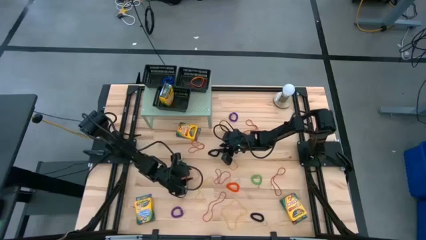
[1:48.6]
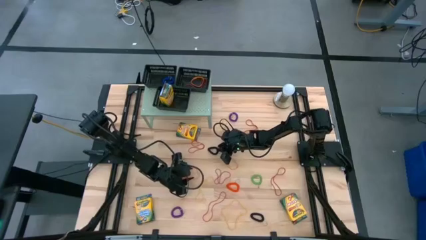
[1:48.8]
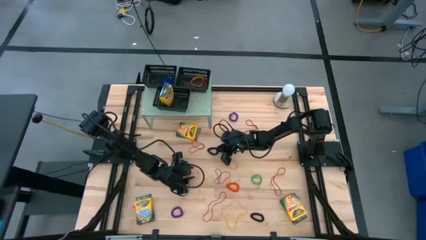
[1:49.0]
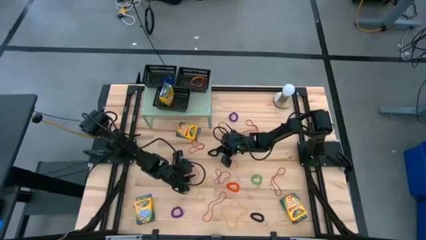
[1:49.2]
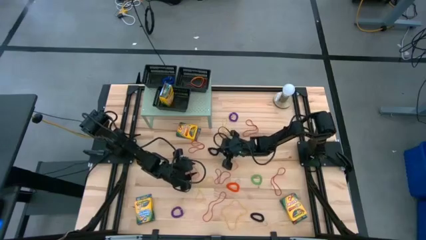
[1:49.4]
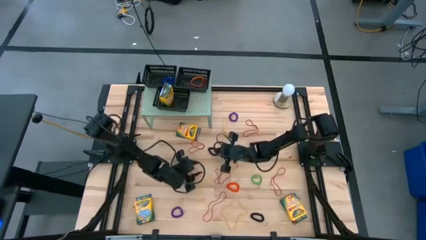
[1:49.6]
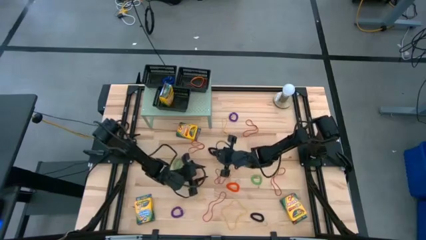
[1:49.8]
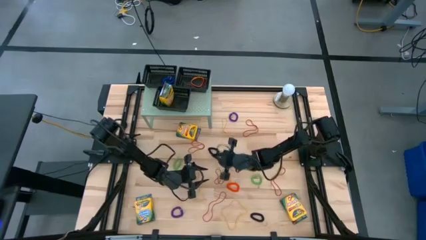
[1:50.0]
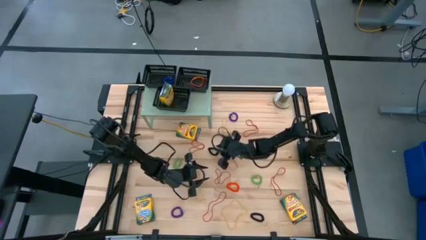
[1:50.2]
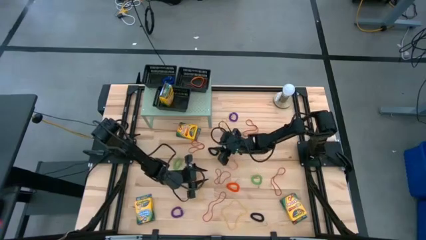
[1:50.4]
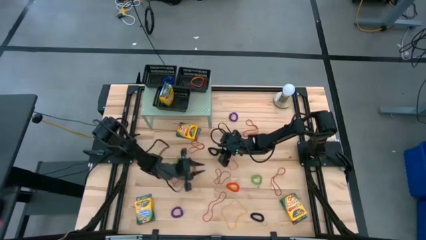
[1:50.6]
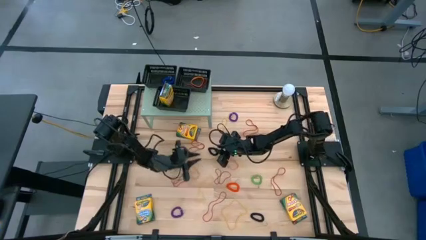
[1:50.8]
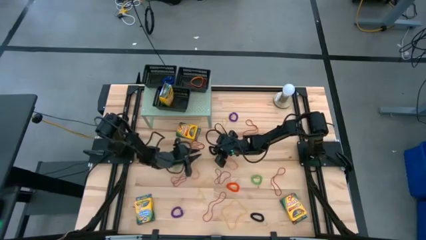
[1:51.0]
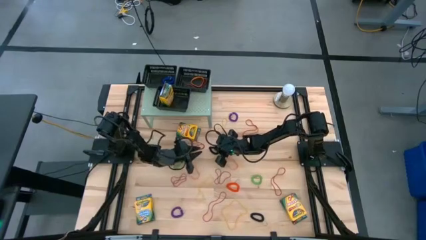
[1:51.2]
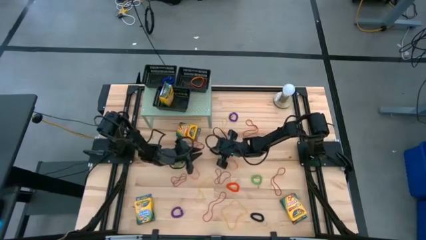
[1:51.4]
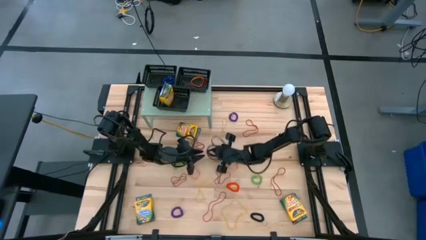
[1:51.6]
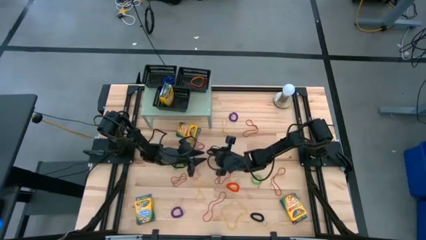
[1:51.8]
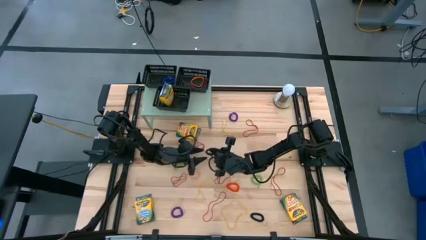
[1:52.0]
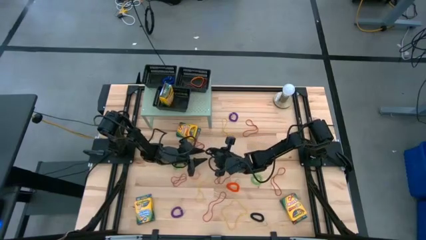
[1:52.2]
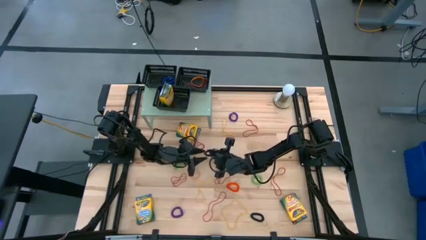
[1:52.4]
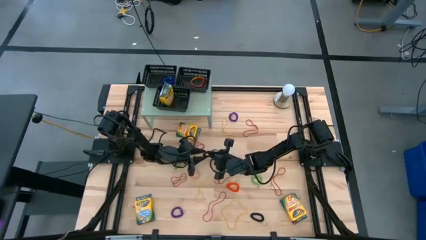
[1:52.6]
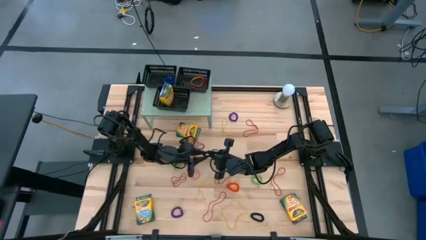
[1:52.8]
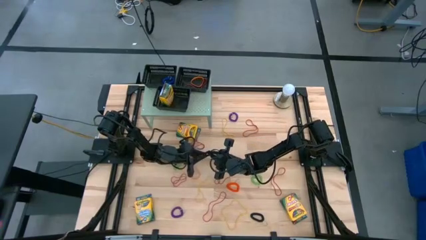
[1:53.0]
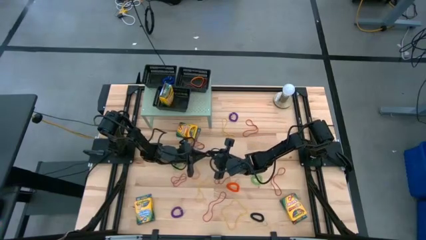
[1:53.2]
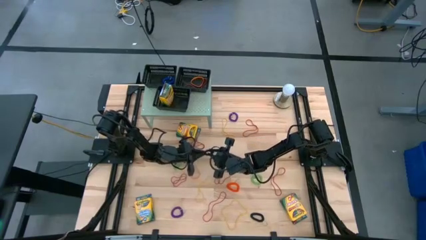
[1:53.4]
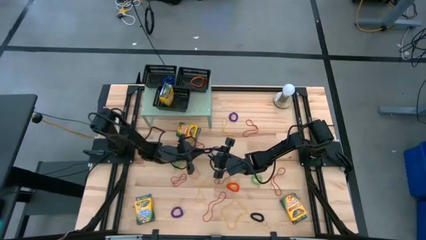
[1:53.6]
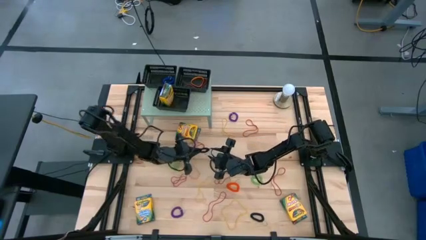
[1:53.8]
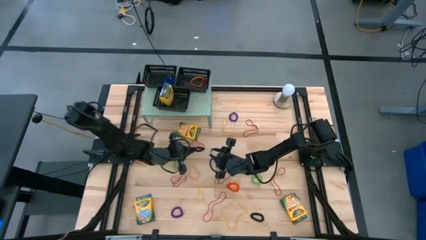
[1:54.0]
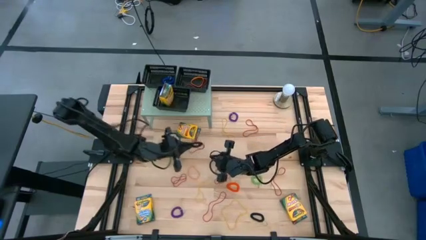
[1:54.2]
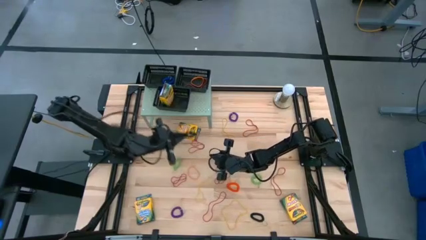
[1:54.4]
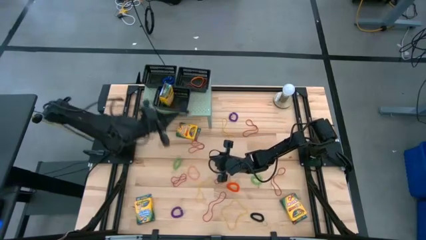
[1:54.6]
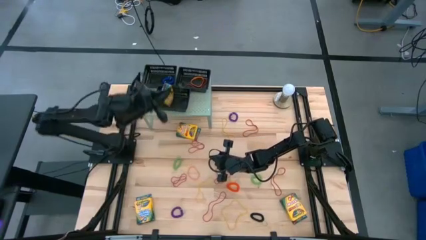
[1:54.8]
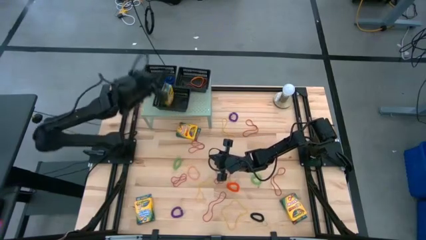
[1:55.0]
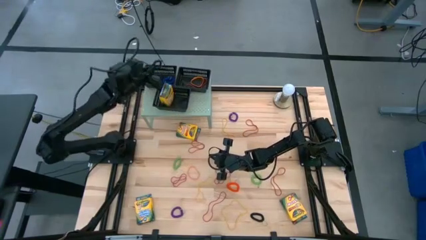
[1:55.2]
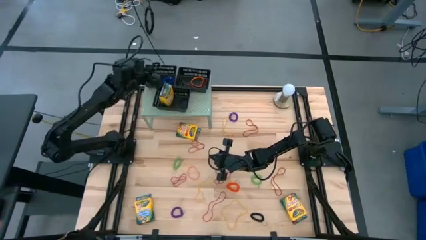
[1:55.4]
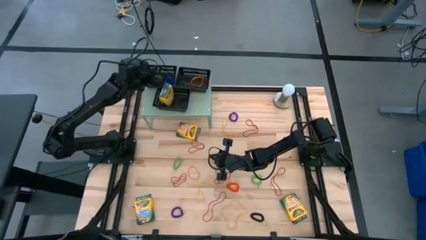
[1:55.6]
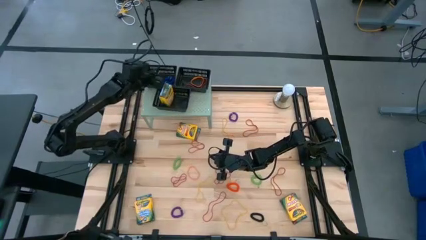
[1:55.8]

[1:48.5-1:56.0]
Task: Pick & Place Office Desk Supplies
Put the black spring rubberband into the top left black bin

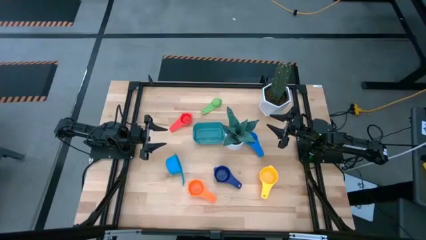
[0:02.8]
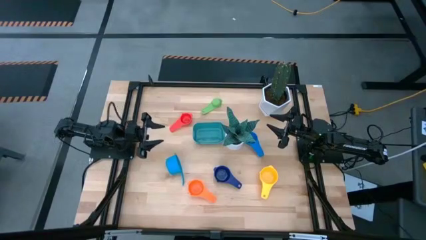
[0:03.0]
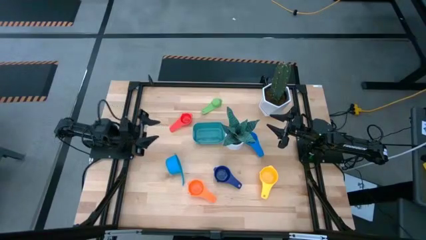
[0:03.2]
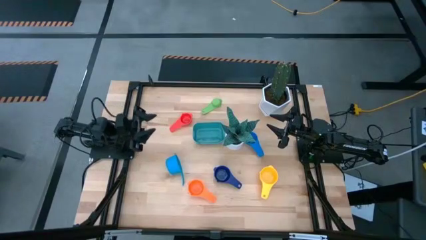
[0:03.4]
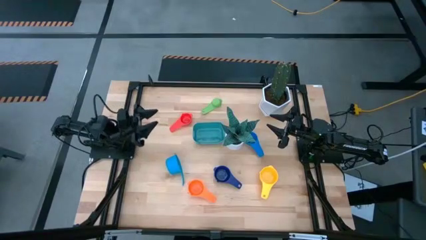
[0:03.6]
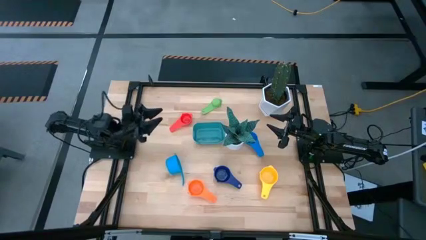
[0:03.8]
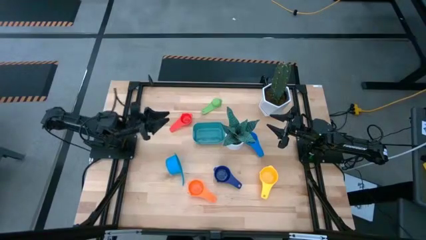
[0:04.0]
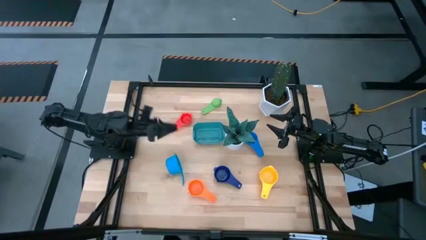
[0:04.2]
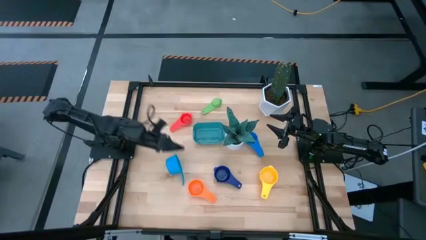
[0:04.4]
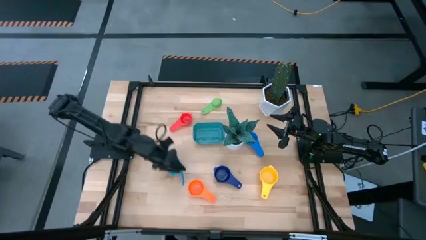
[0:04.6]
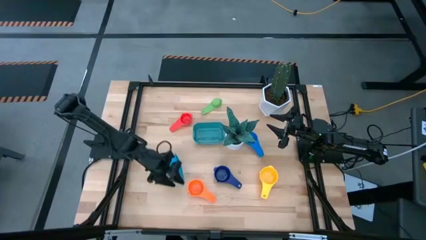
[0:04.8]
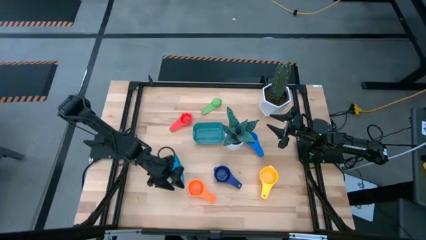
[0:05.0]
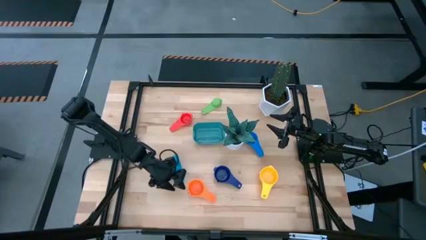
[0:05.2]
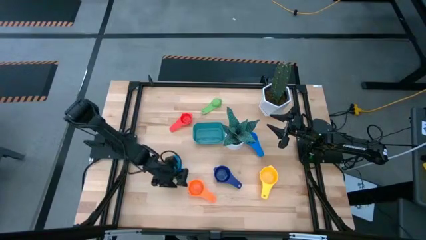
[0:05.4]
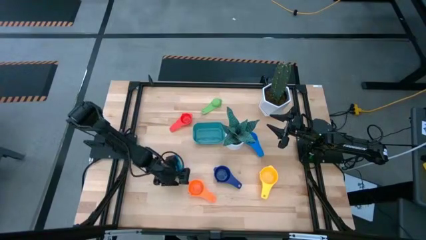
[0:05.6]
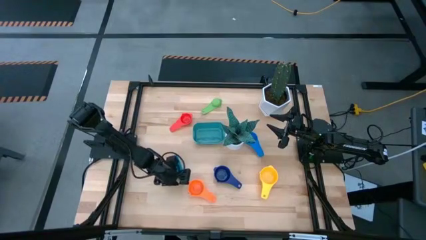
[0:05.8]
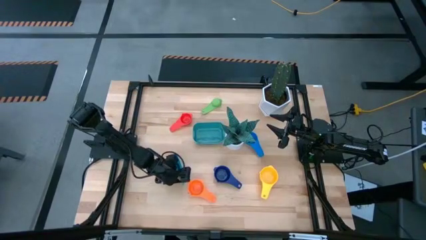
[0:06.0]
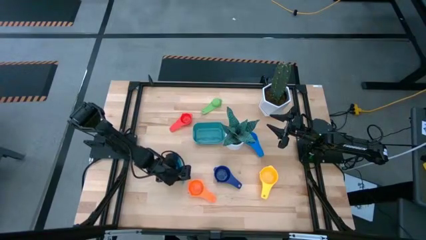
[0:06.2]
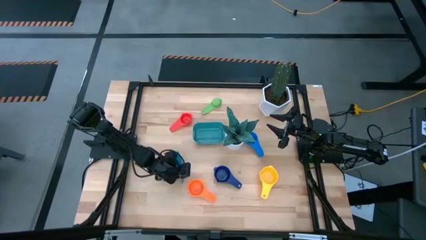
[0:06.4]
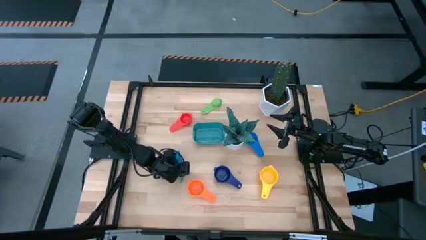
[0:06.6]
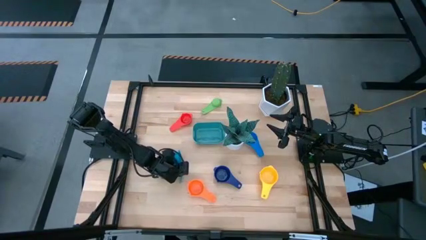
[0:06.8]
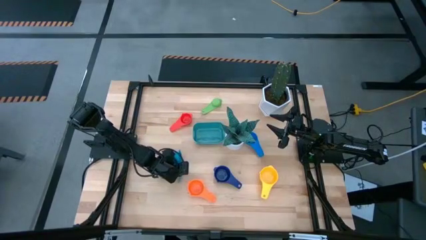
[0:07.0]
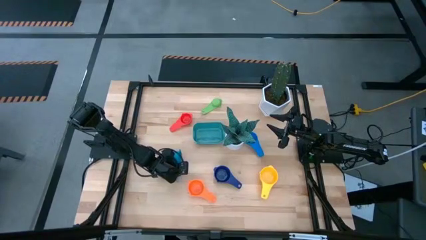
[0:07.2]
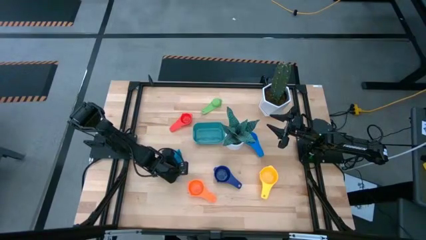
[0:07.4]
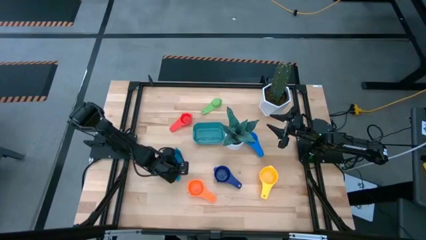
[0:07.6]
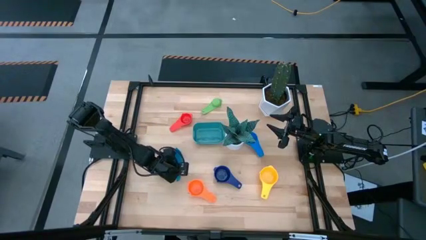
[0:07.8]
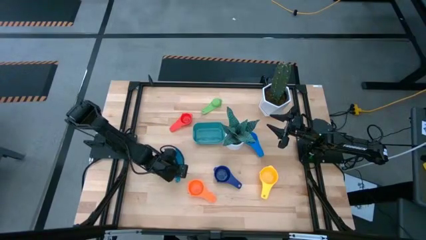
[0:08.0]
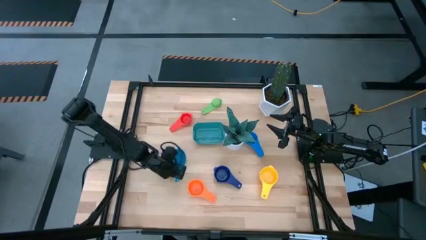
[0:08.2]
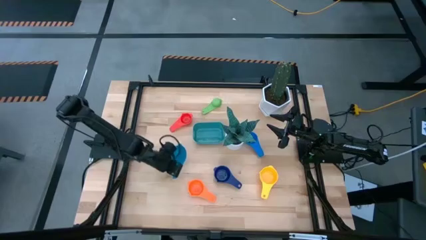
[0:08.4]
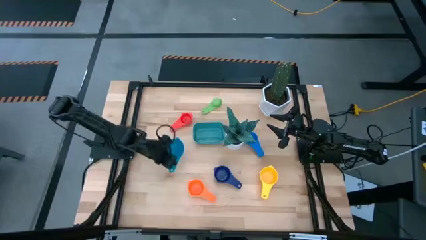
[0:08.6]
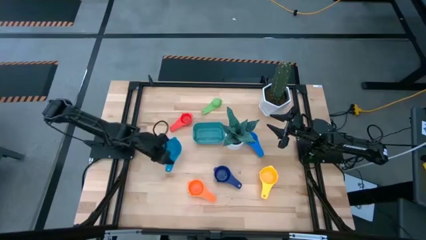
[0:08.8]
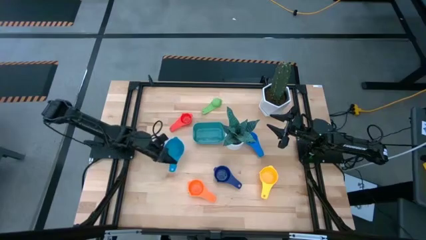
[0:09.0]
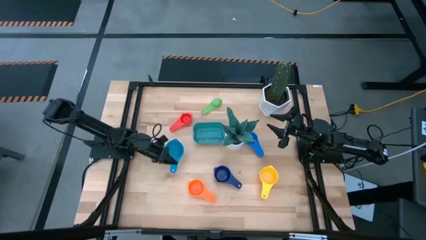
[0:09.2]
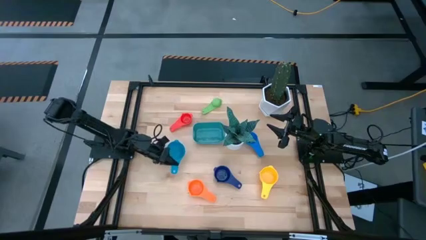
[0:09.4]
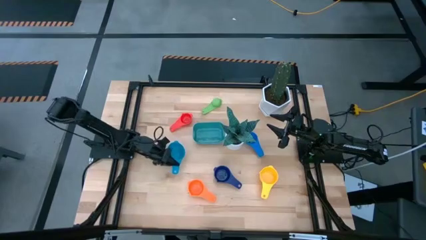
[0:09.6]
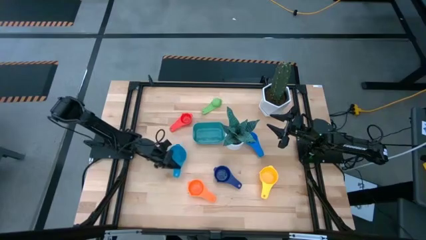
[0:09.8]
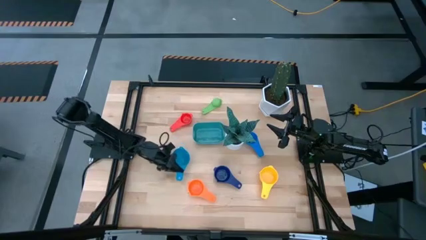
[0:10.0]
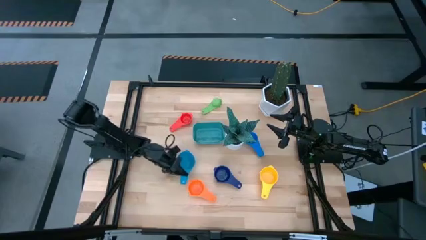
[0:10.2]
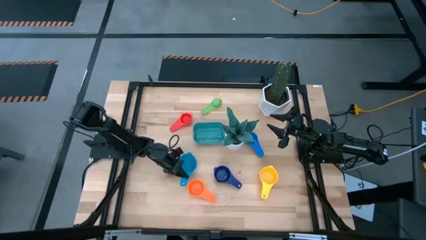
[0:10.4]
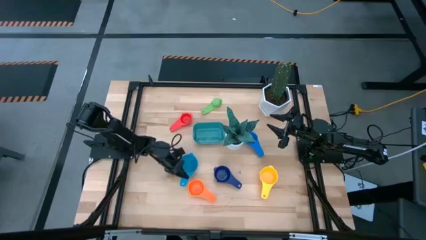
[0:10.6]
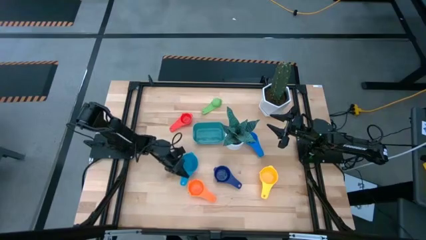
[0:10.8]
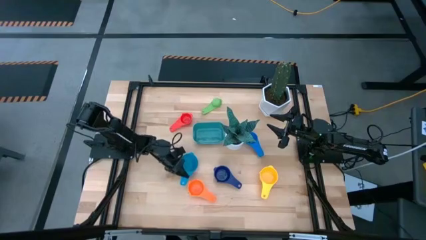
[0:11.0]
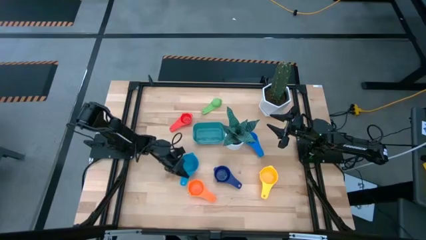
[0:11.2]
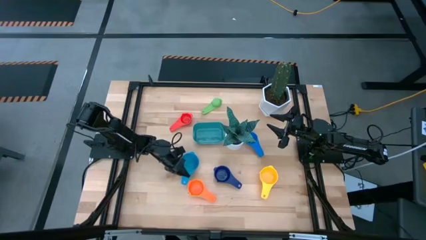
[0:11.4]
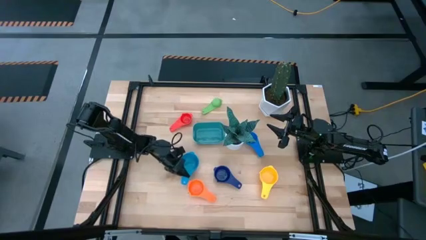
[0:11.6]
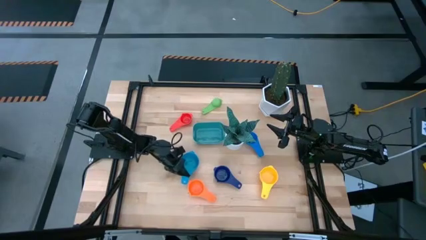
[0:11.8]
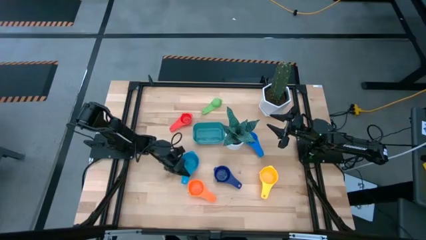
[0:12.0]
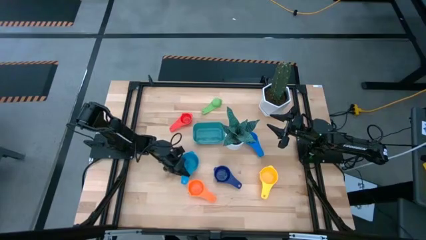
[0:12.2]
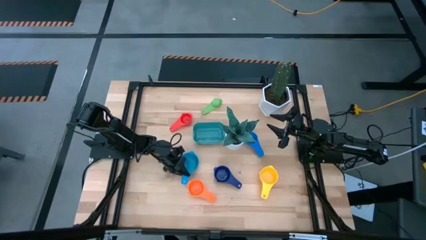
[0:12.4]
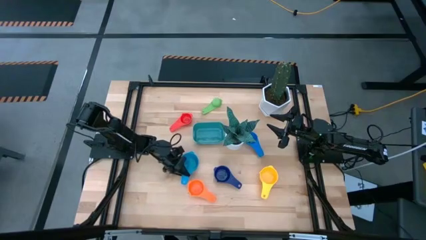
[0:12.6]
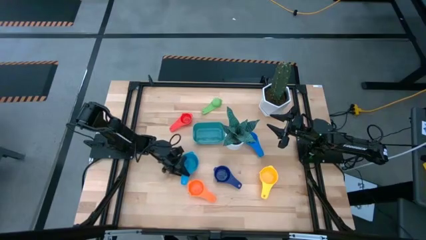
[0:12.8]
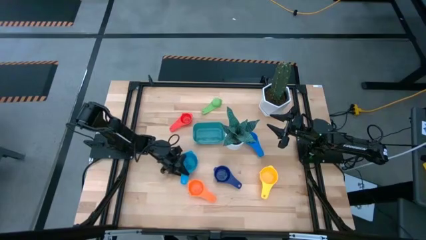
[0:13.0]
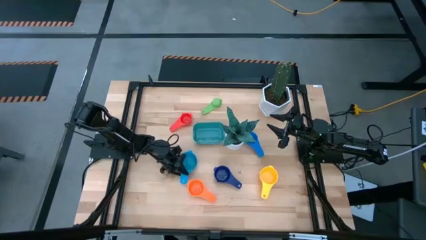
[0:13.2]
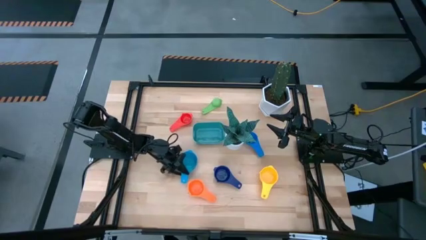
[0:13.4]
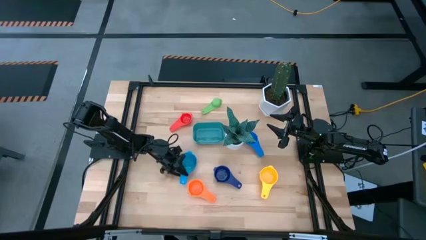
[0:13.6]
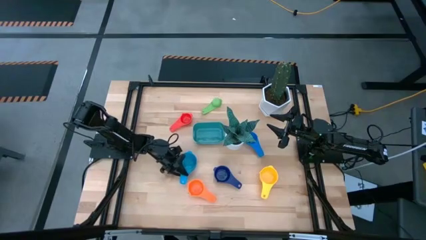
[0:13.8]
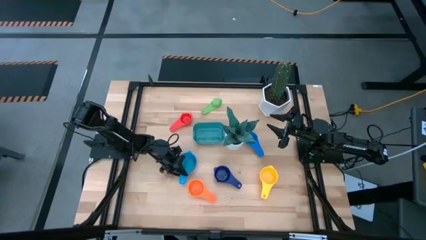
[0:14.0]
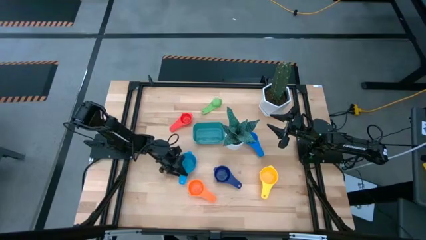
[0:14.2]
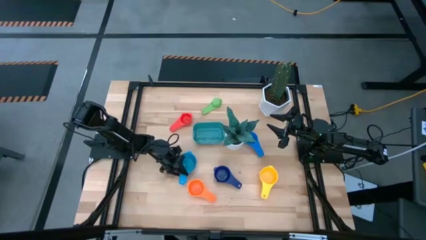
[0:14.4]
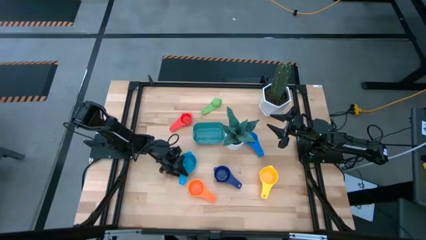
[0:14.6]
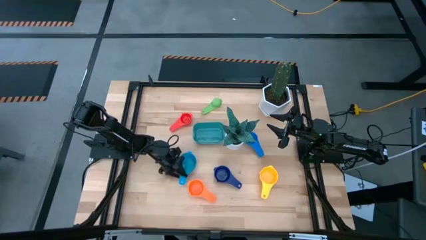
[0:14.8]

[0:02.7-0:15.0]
Task: Nest measuring cups in basket
Prepare the light blue measuring cup
